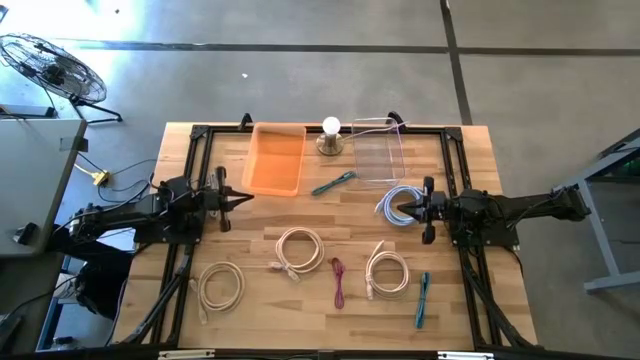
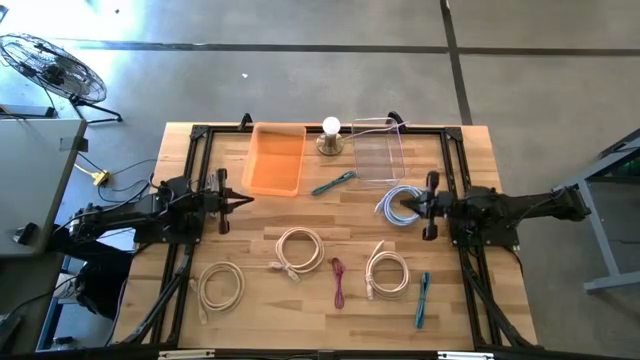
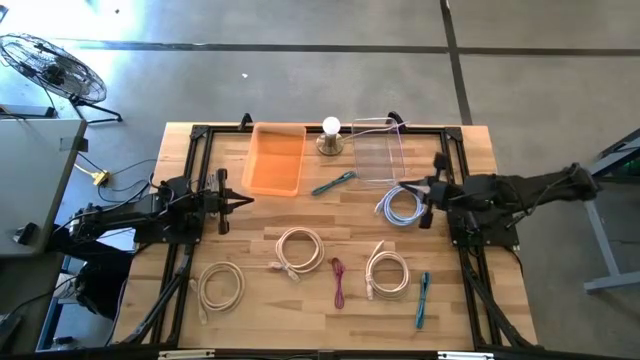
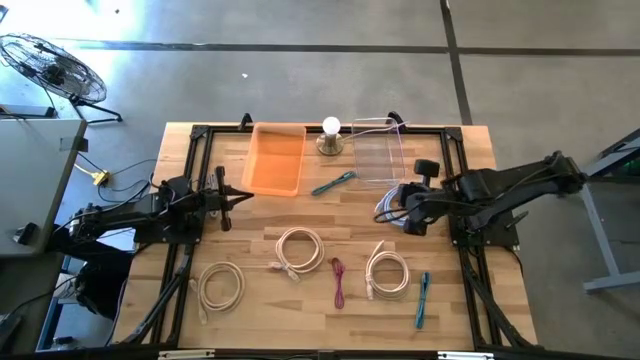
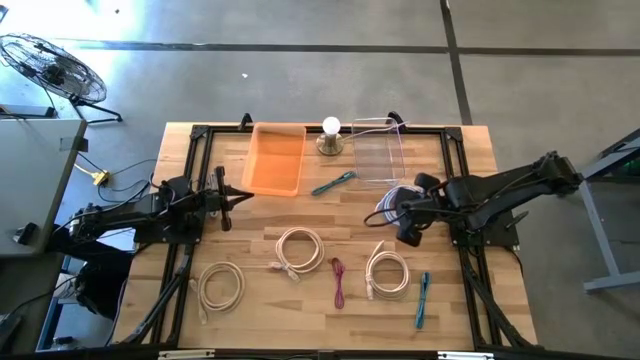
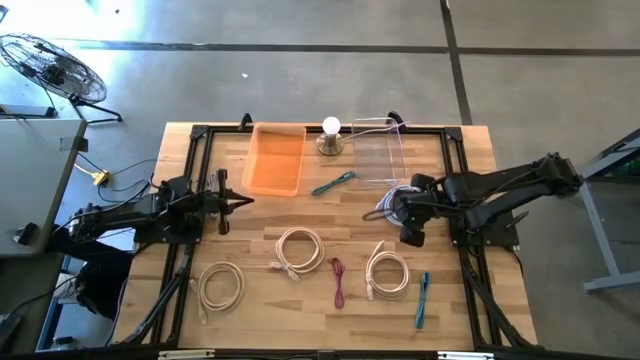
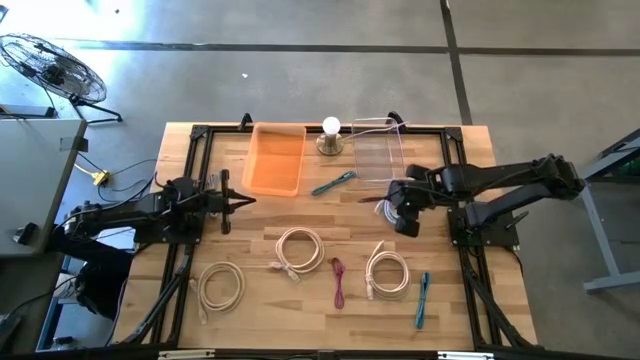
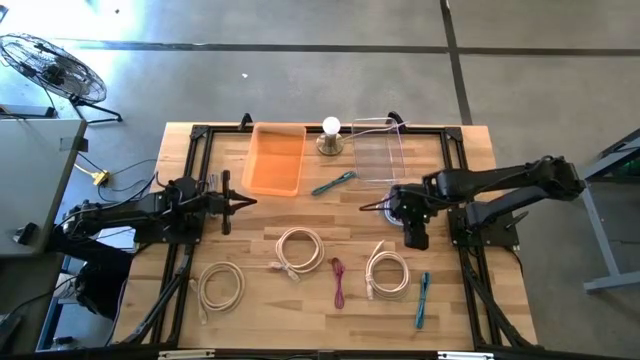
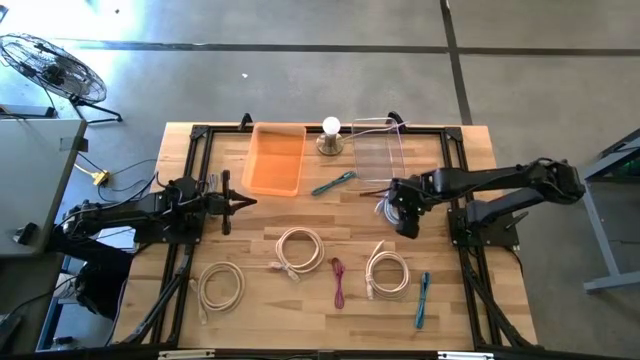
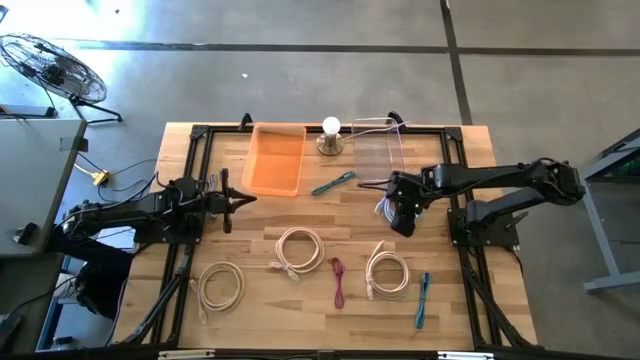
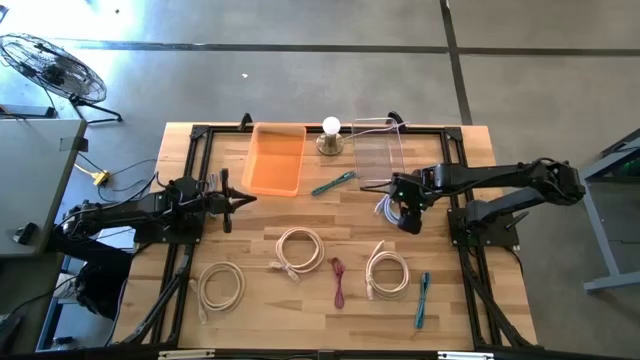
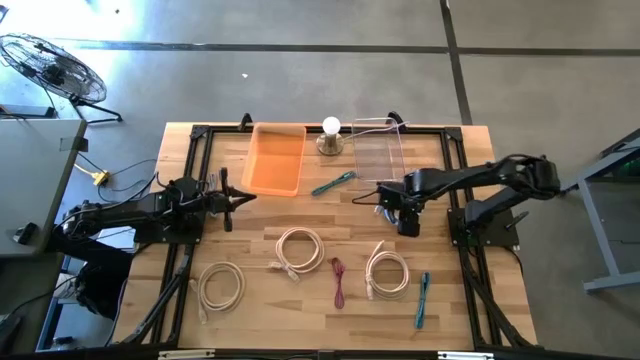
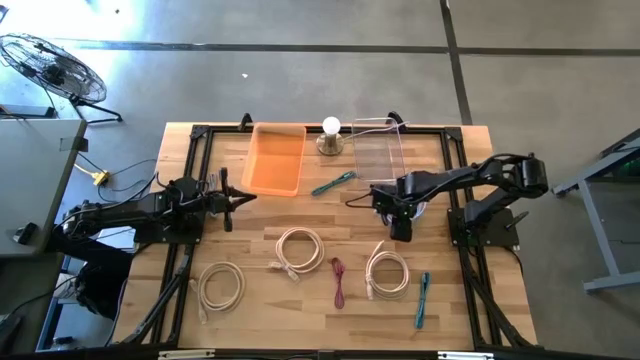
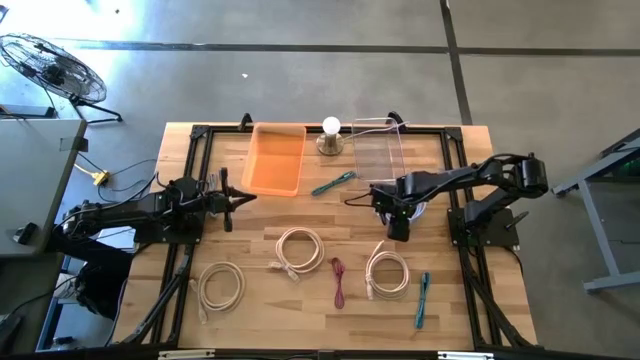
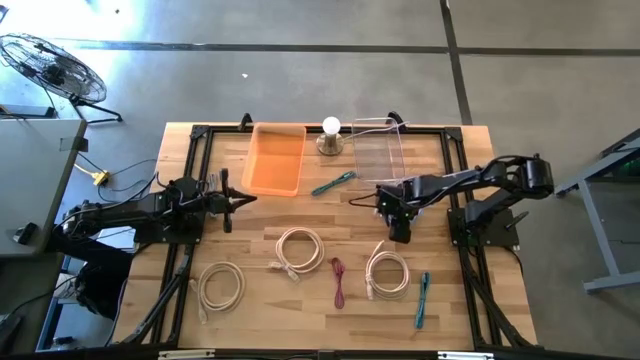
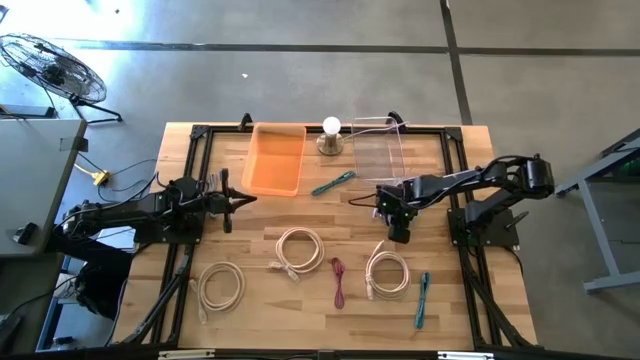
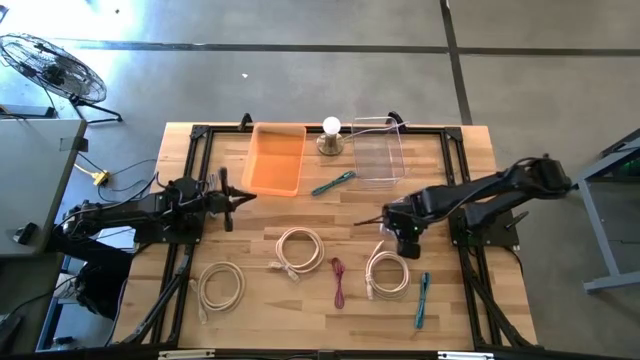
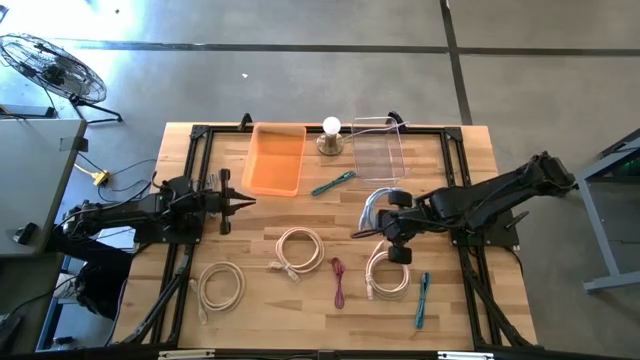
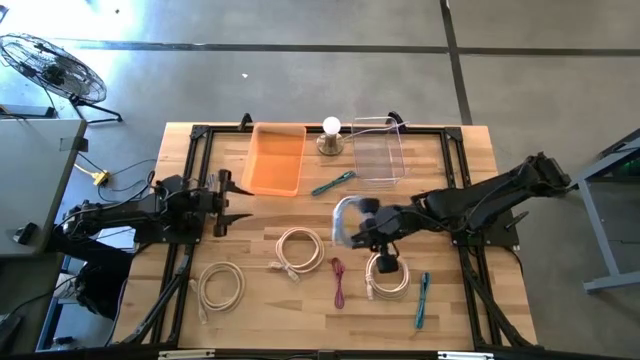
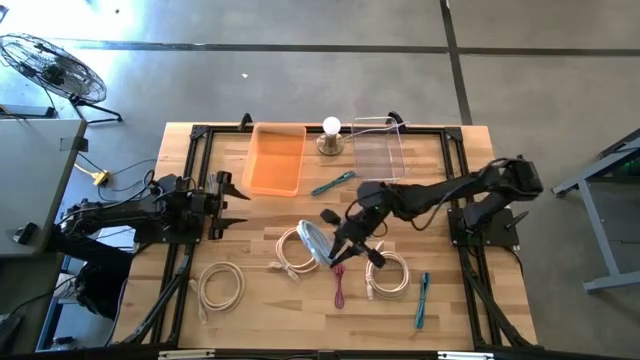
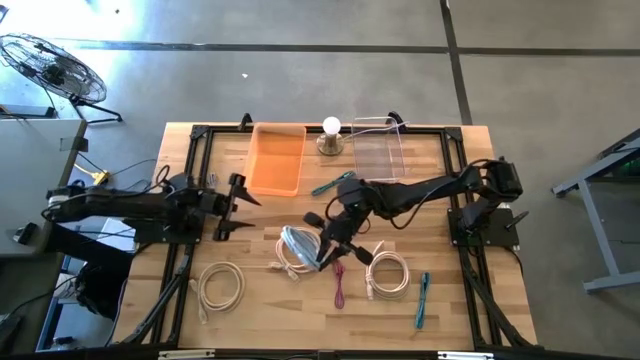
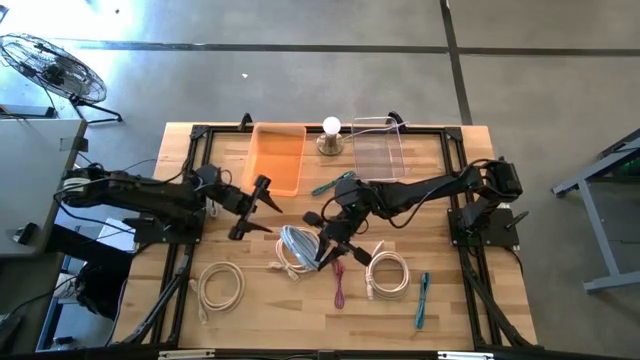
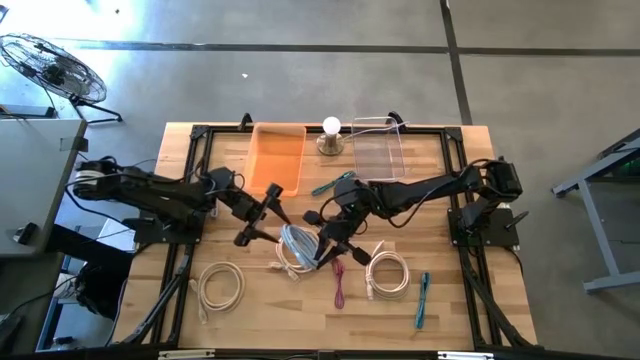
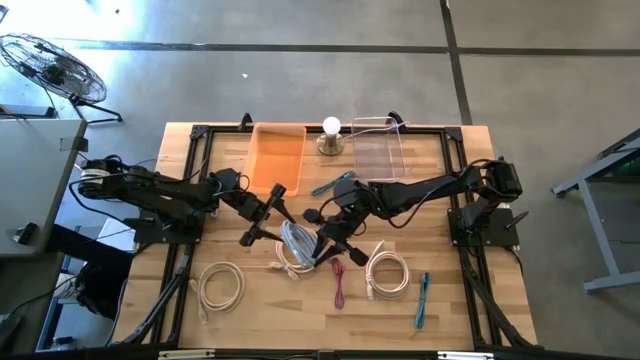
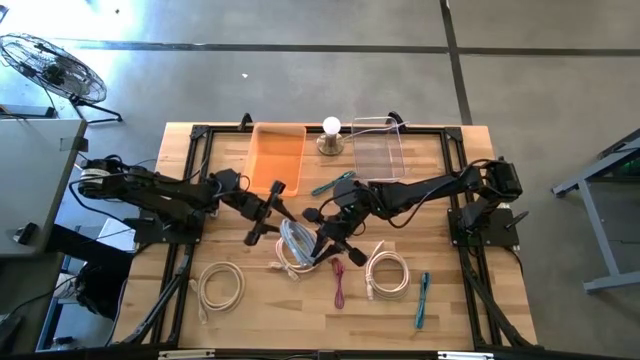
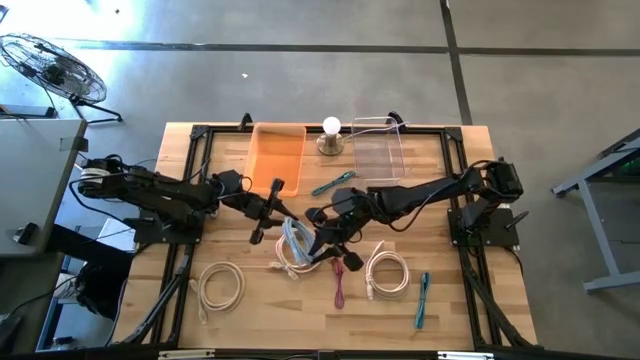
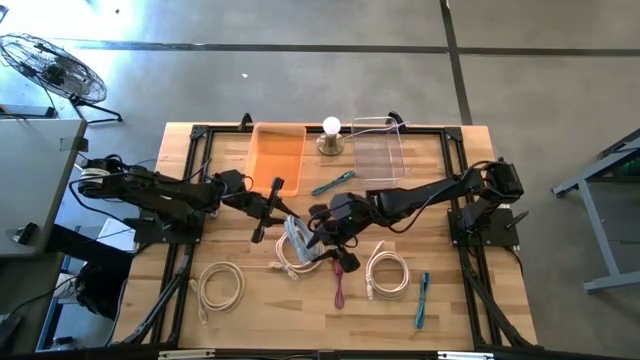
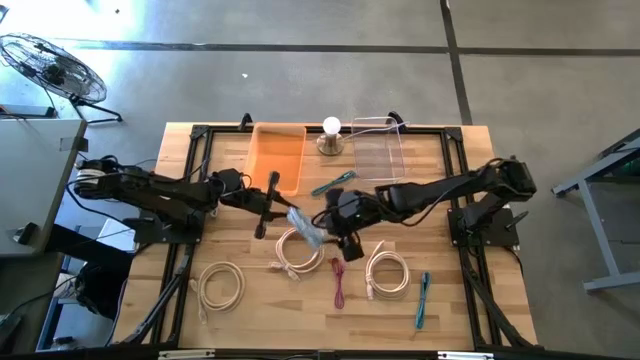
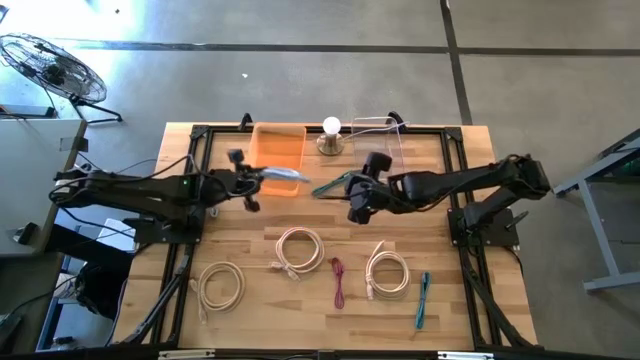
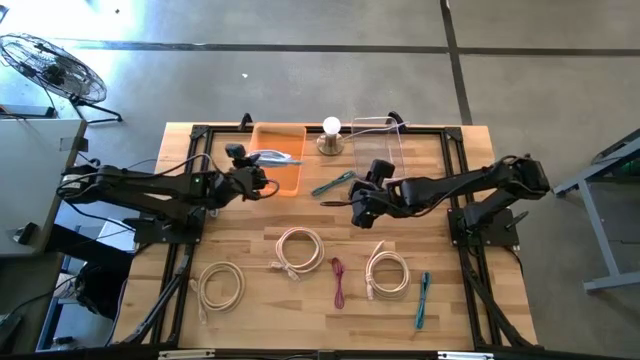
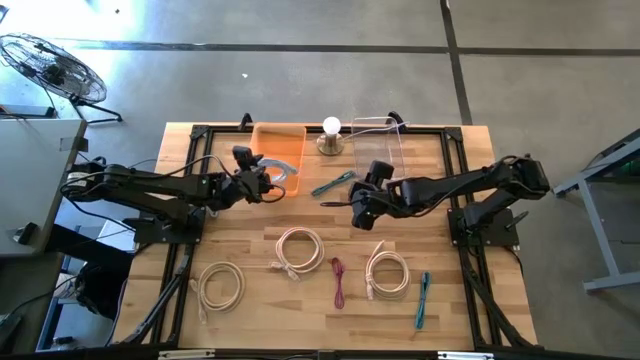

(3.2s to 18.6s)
Task: Pick & Place USB Port
Put the blue HDMI cable into the orange bin

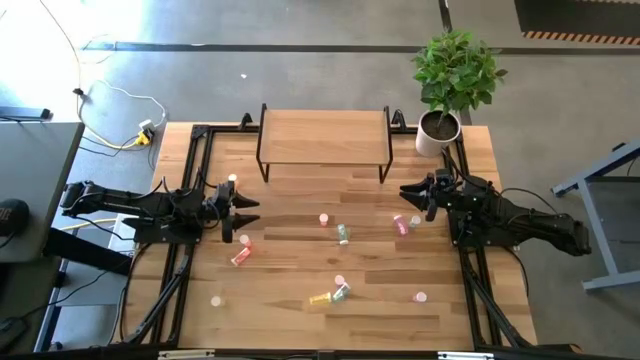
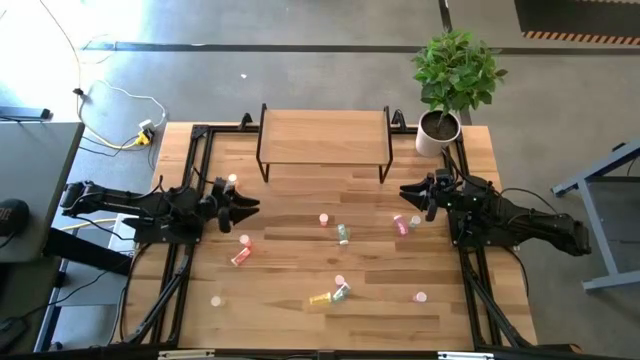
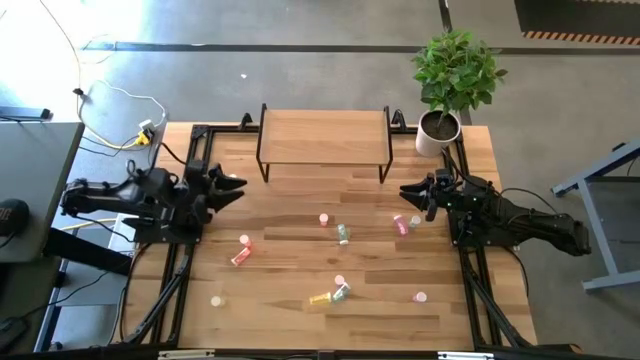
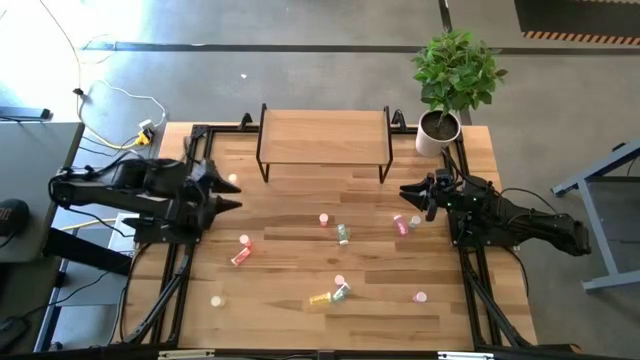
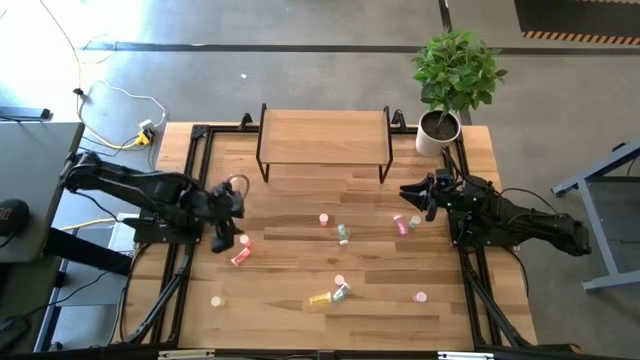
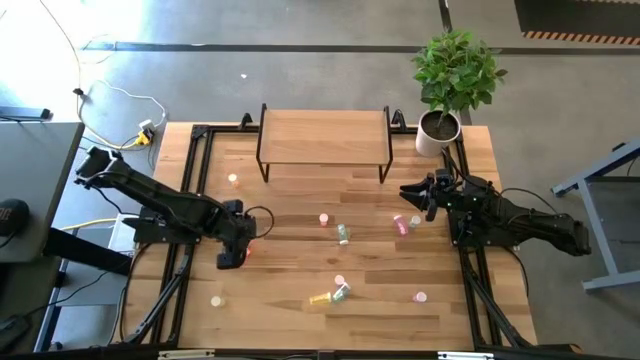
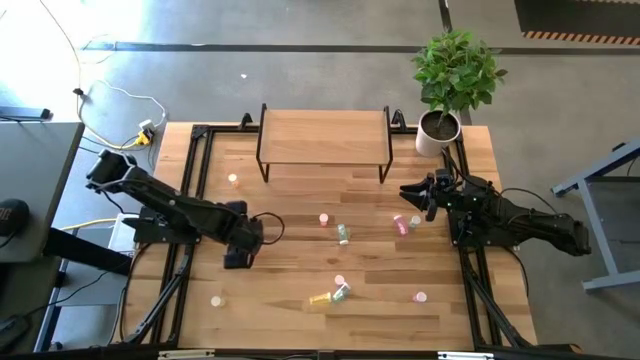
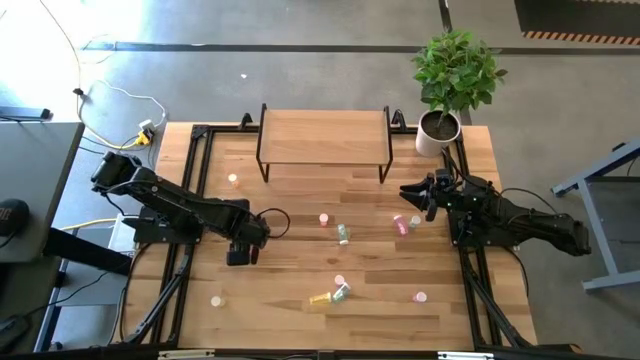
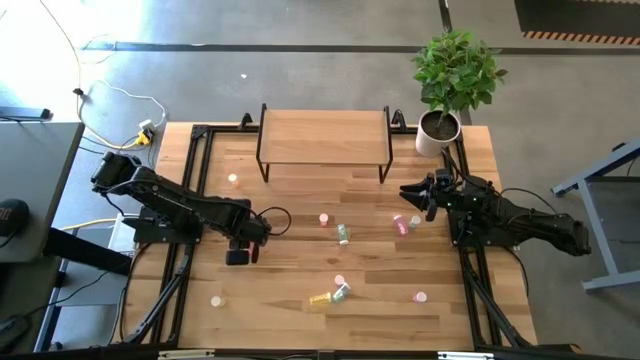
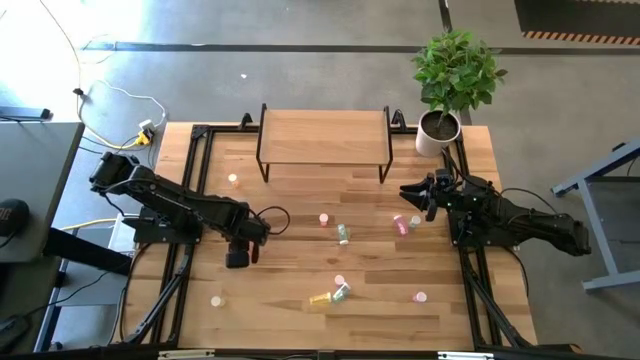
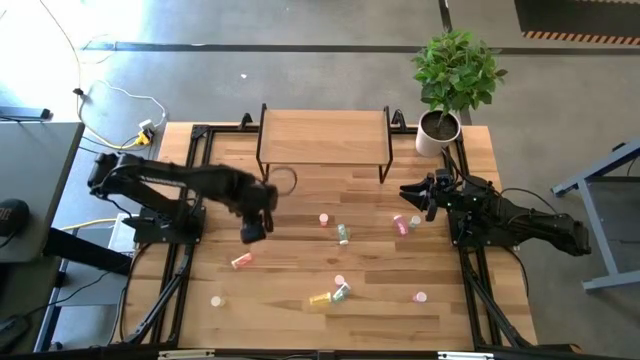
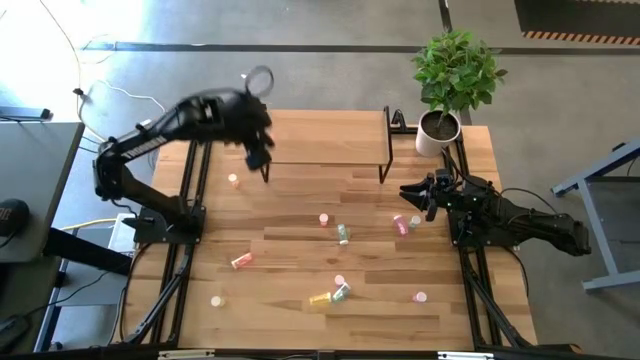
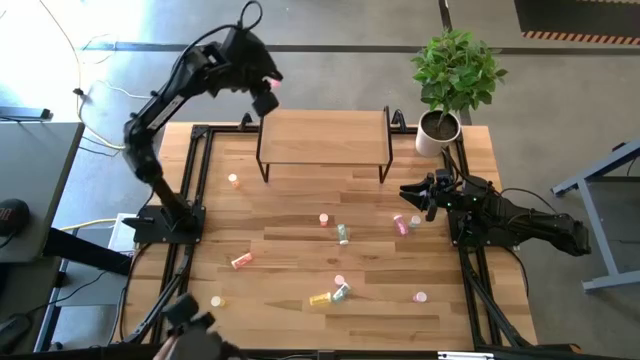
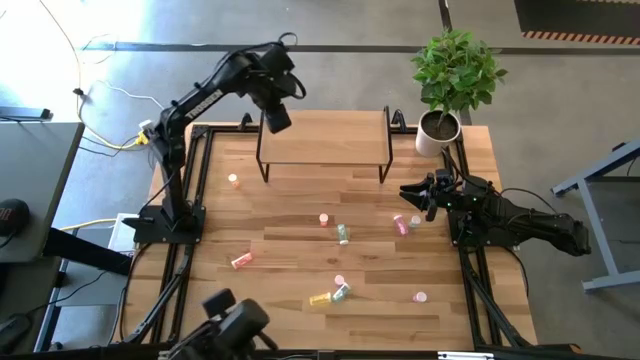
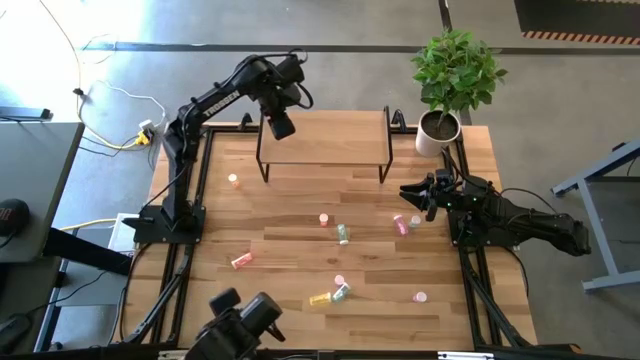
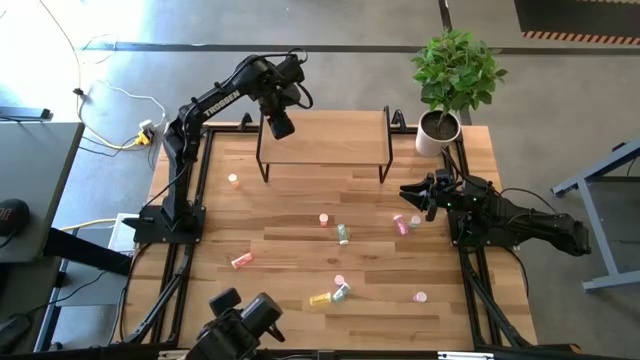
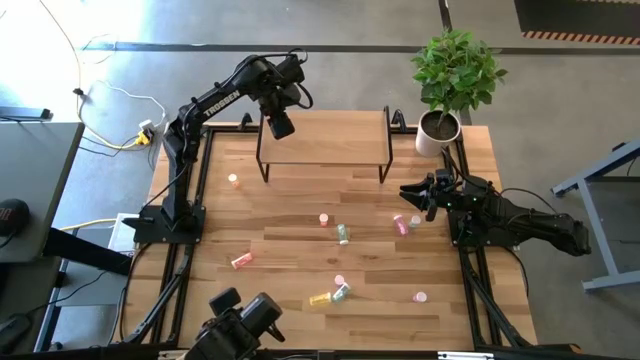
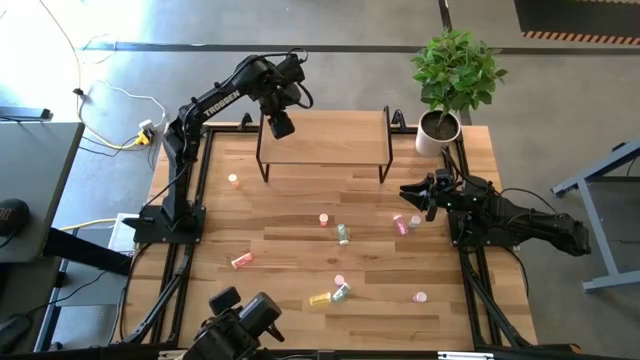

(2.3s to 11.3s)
Task: Pick and place medicine bottles onto shelf by color
Put the middle left pink pill bottle on the shelf
